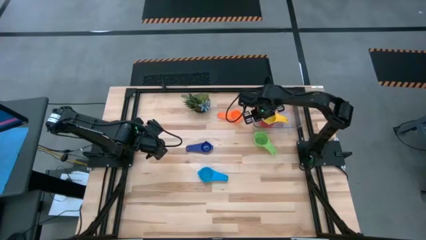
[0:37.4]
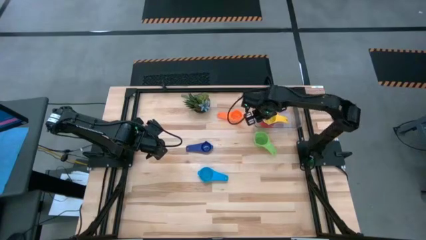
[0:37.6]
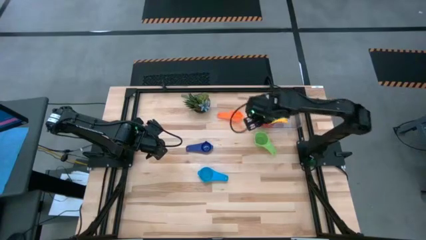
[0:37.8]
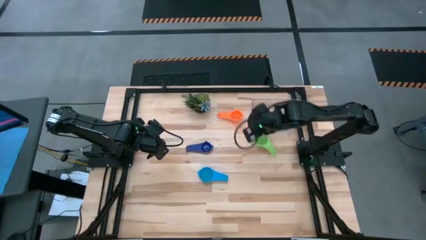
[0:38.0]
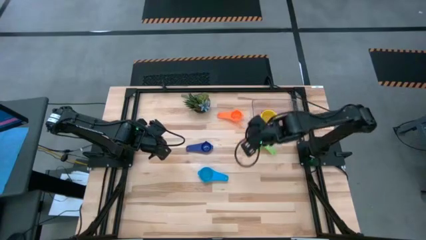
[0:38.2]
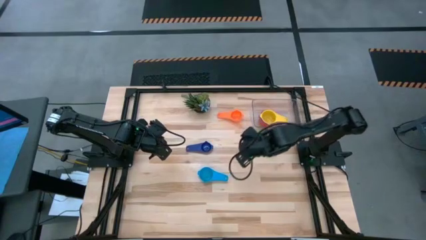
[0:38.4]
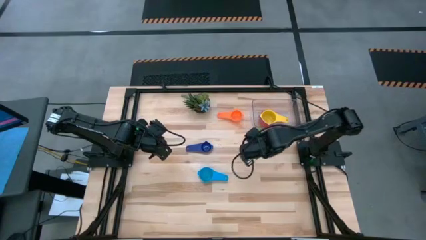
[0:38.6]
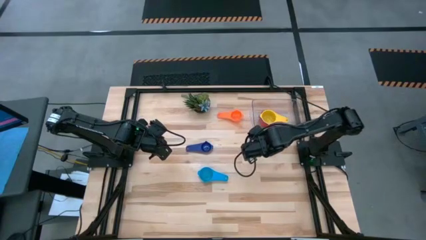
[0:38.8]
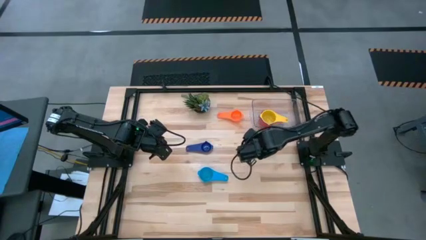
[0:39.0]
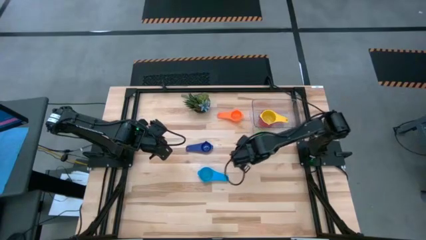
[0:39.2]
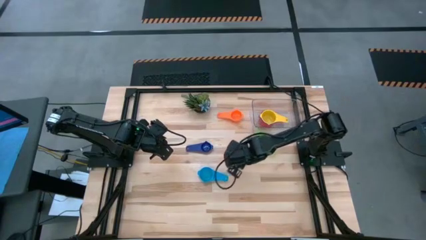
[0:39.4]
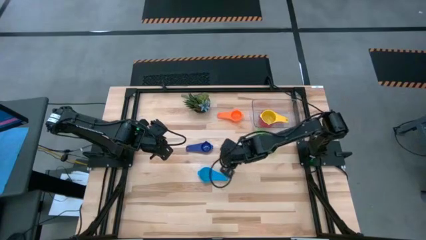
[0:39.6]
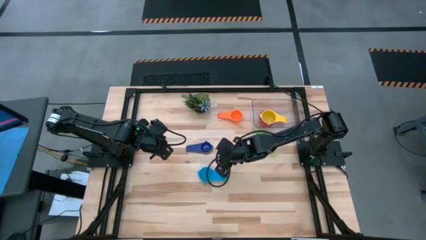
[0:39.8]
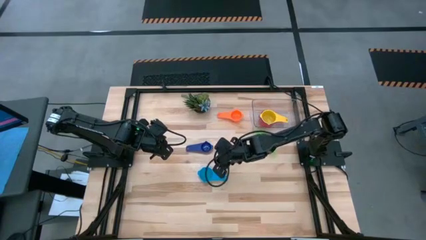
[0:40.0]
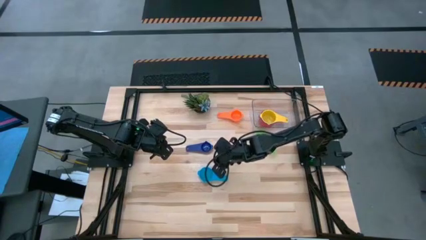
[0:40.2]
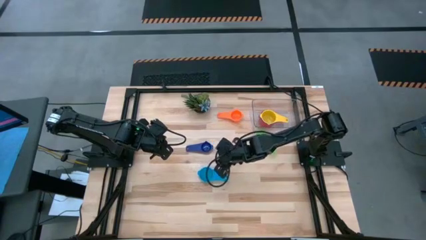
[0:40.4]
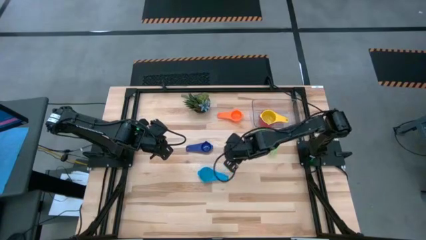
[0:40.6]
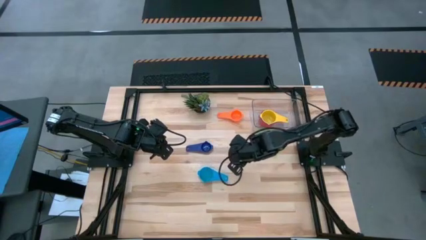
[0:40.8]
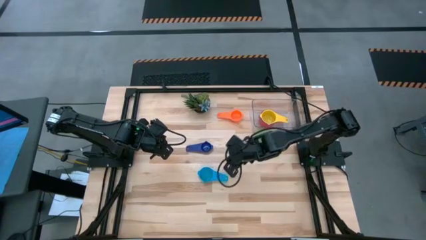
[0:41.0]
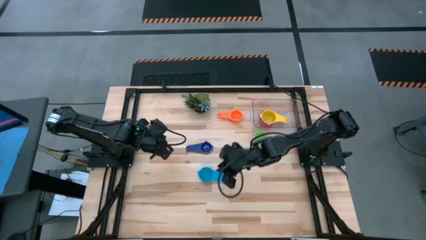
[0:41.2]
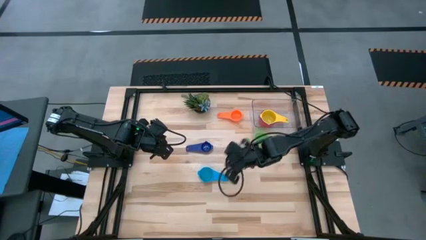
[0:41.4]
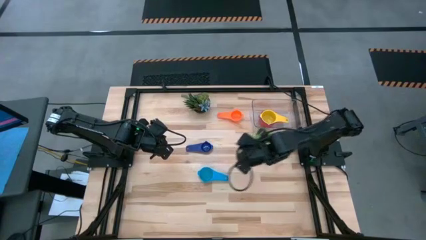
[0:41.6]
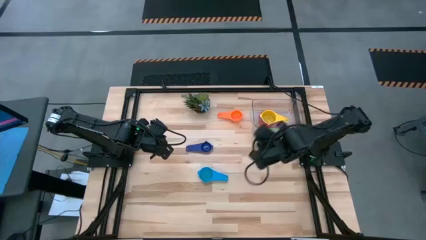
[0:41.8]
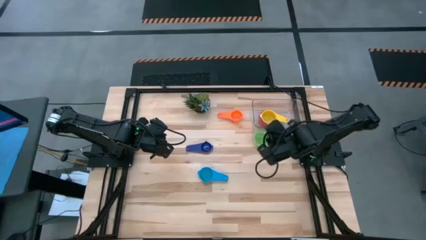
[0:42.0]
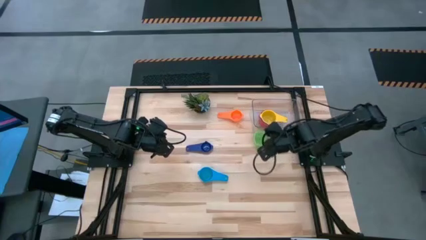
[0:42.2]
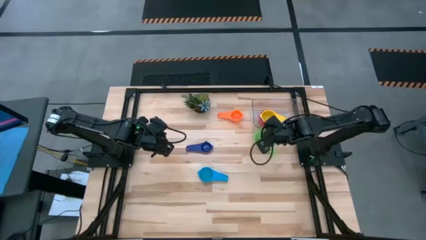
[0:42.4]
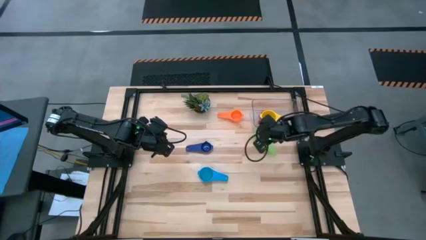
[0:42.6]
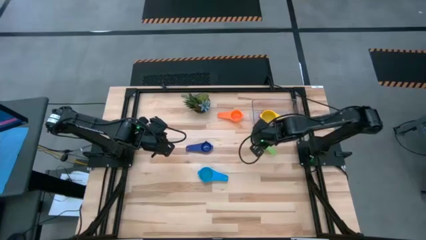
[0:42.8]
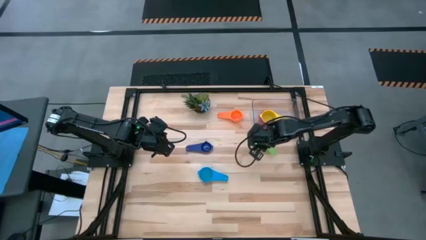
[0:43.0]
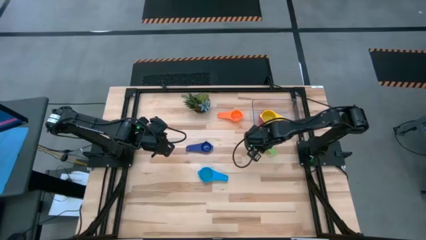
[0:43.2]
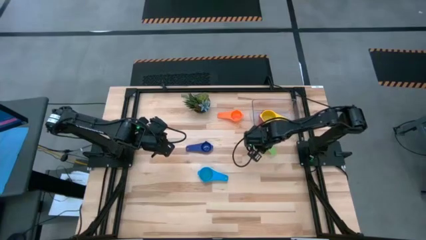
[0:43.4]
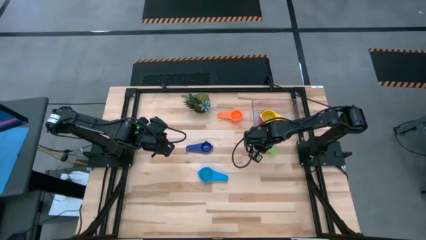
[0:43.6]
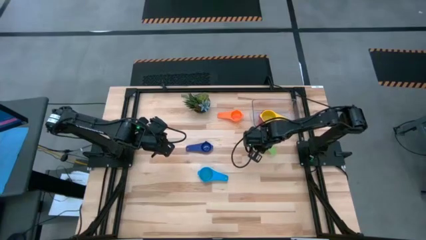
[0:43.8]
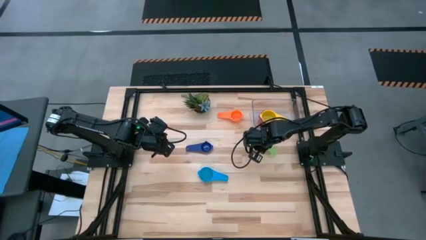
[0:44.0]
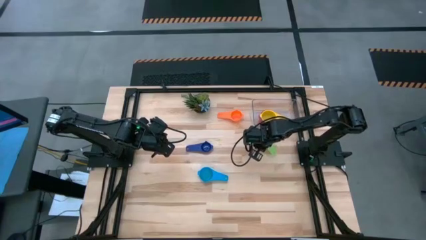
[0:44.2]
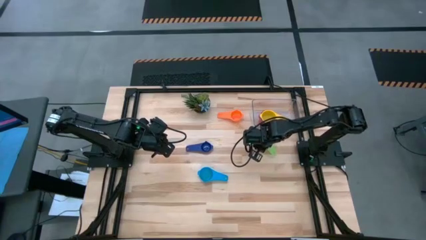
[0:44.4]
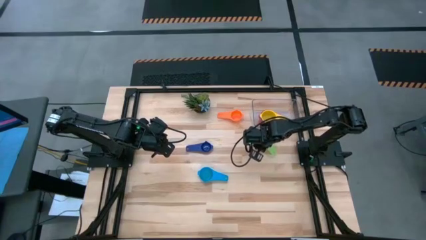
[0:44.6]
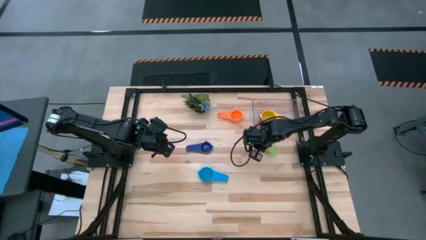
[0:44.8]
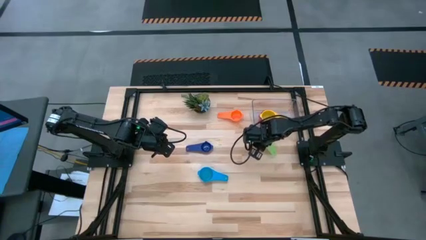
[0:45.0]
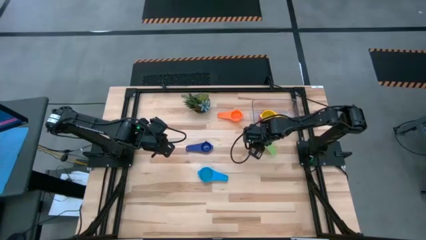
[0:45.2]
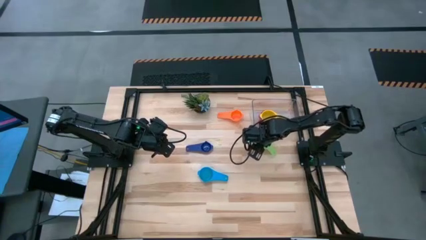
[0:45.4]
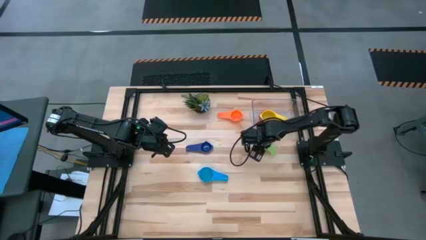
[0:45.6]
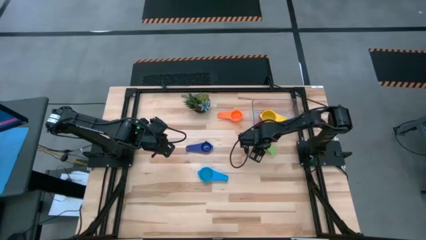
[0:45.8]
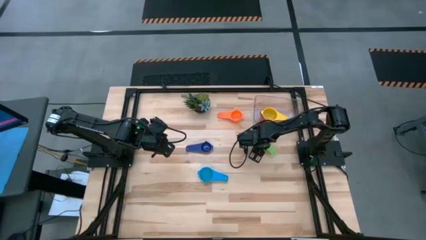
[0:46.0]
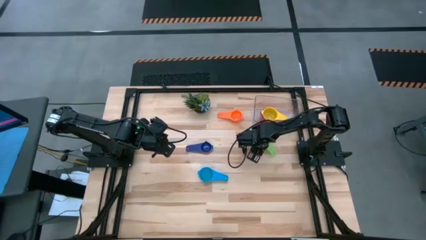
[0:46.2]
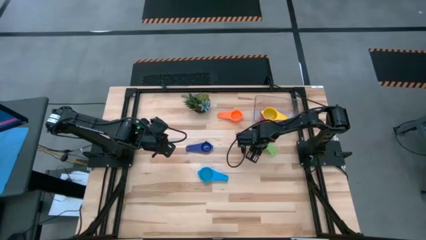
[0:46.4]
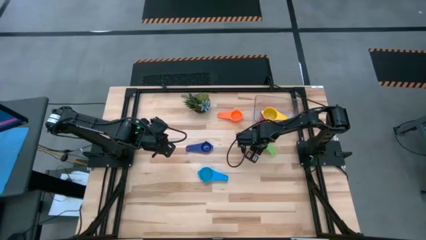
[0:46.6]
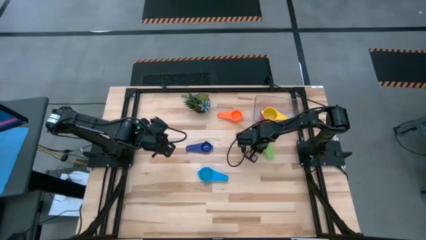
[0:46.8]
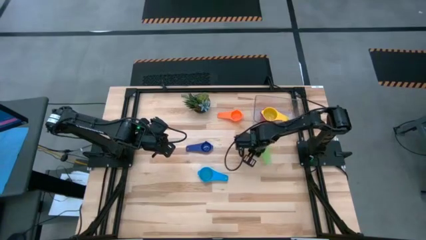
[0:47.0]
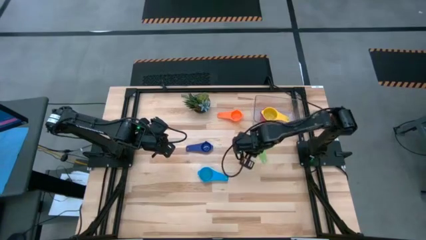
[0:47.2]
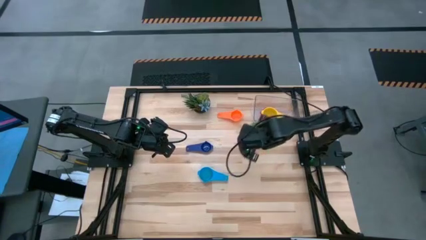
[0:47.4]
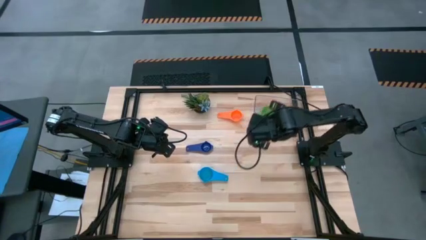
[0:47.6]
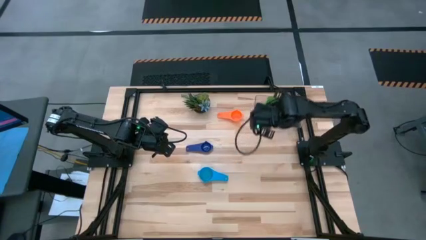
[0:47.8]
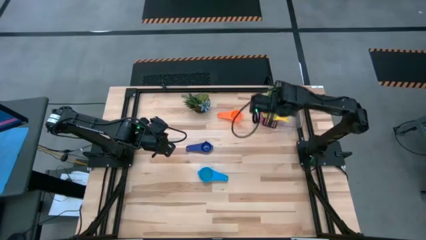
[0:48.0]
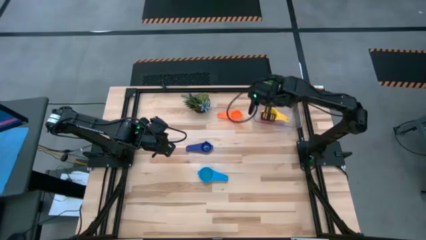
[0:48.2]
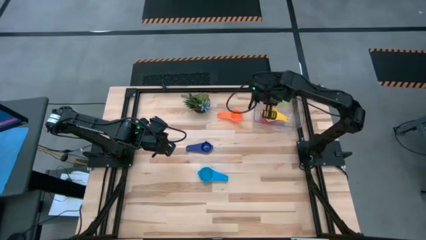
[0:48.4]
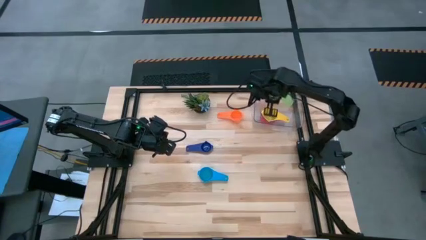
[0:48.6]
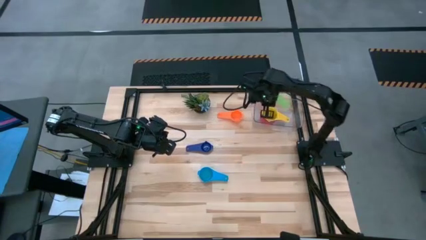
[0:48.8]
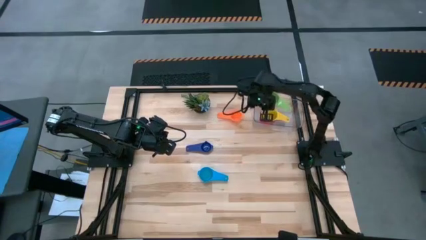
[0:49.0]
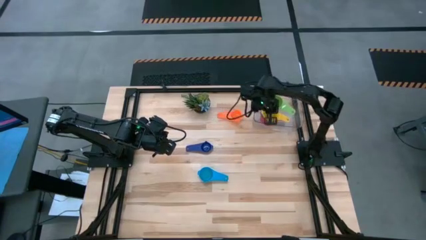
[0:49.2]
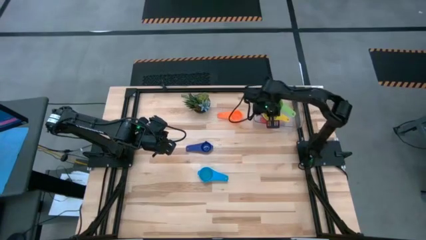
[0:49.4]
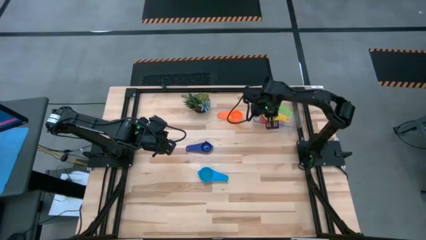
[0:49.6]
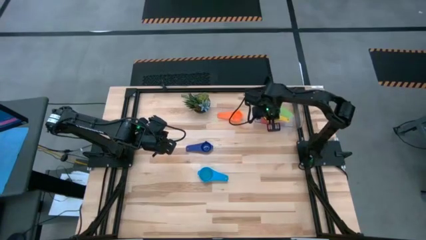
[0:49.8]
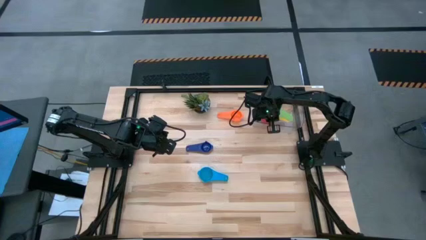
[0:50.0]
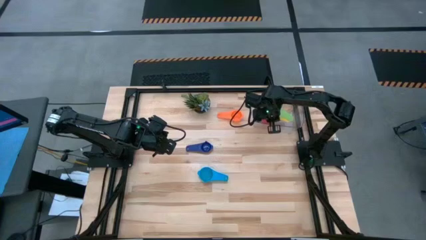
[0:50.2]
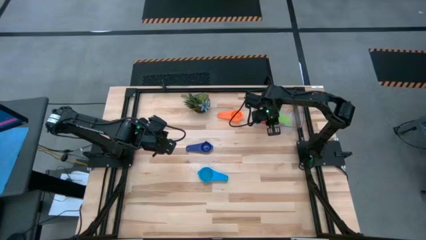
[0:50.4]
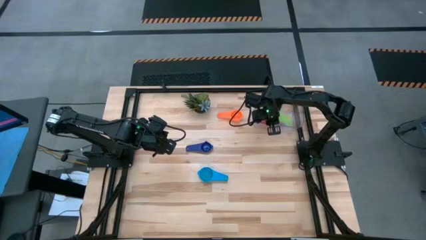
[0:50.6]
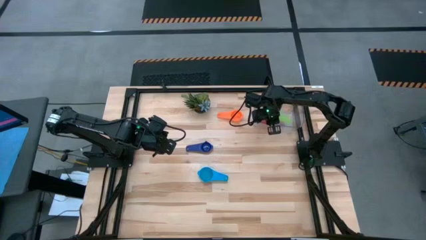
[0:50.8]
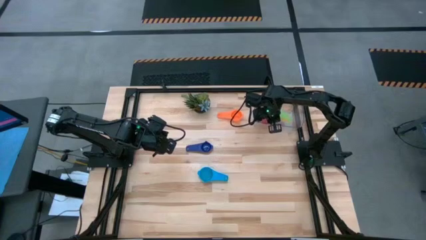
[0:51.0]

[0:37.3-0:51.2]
Task: Nest measuring cups in basket
Stack the green measuring cup on top of the yellow measuring cup in the transparent bin

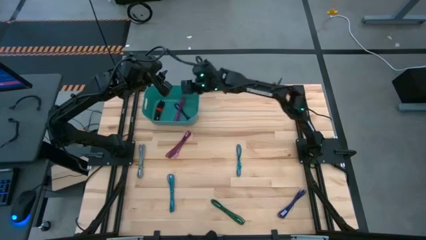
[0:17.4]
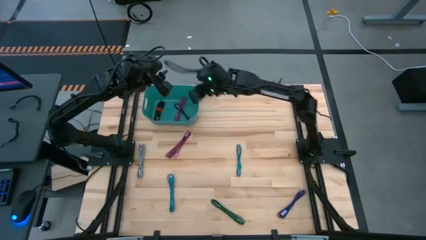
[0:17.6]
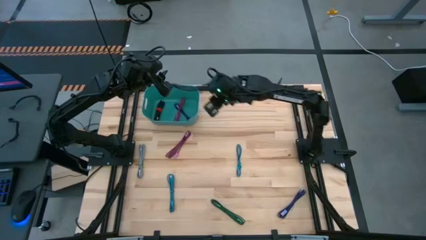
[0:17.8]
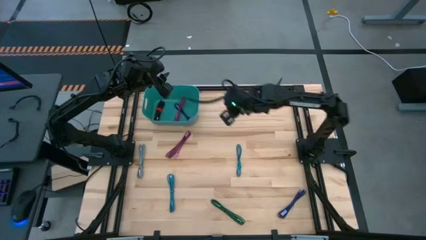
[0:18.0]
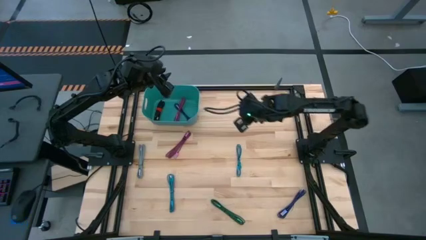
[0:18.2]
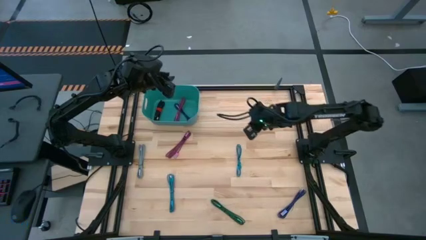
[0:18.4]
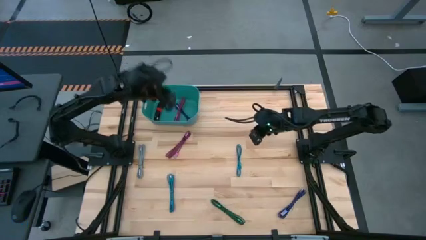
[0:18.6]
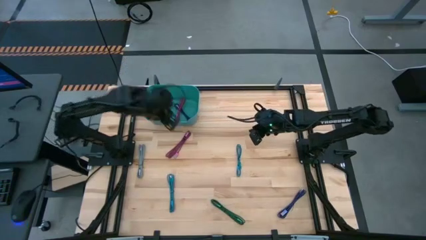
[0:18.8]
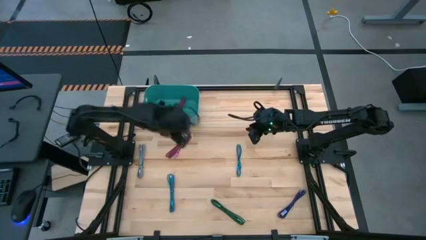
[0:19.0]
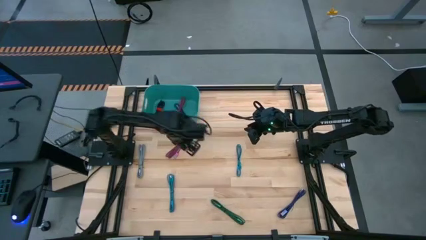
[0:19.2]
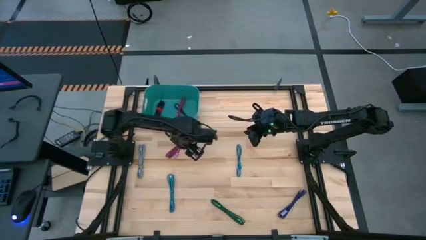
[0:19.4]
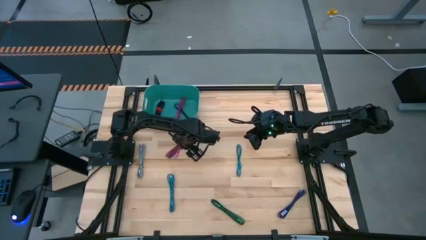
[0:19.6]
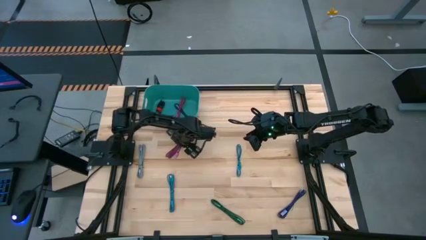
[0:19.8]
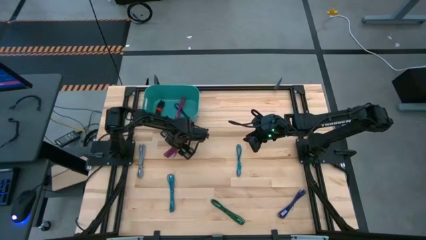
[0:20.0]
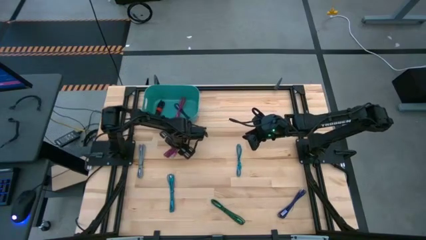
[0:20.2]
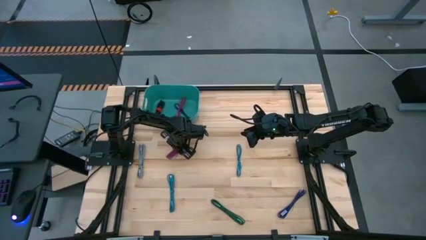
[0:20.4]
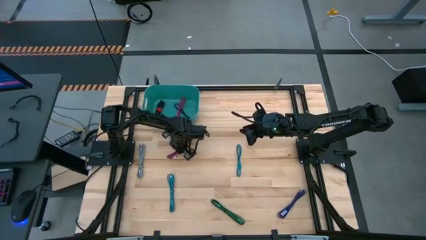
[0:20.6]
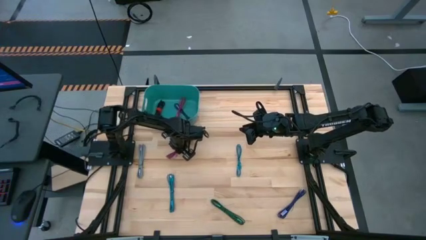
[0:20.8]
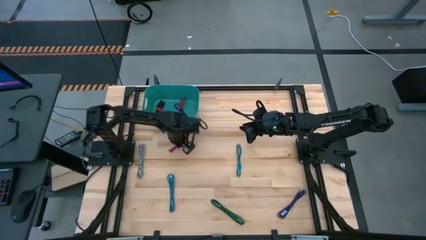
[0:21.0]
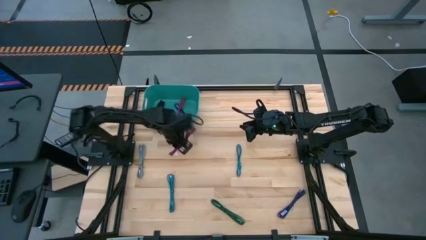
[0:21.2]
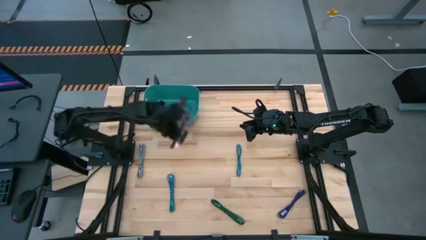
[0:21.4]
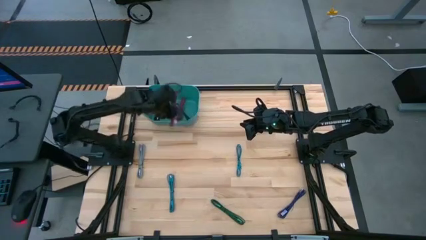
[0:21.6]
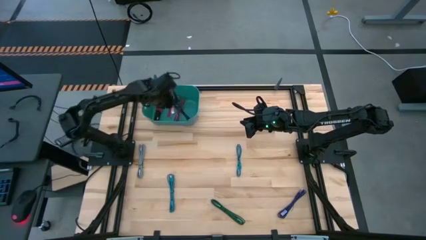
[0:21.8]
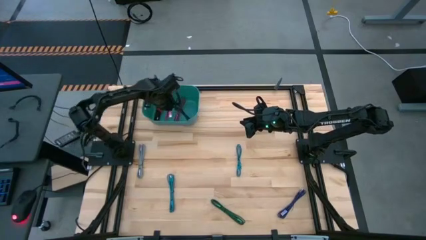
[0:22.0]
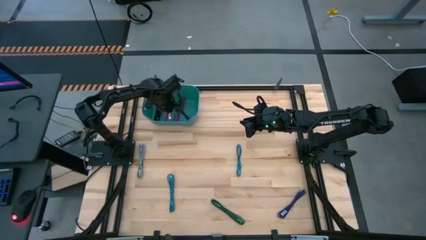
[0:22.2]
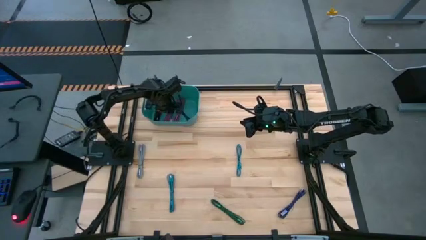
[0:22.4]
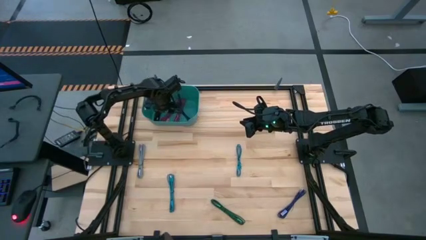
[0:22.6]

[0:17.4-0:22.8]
Task: Pick and place USB-C Cables
Put the pink USB charger cable into the green bin
